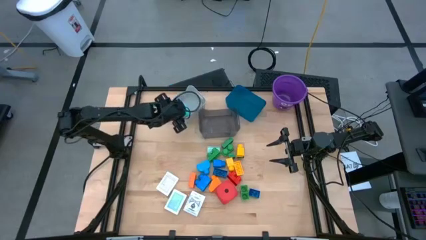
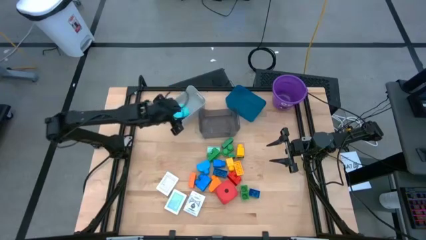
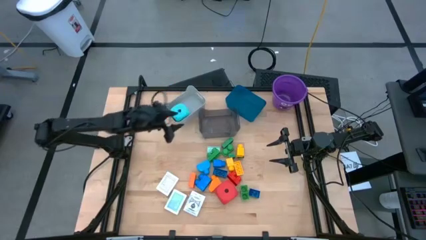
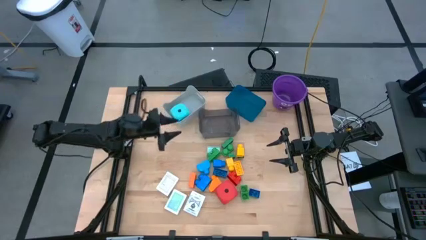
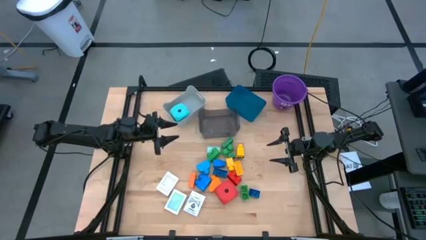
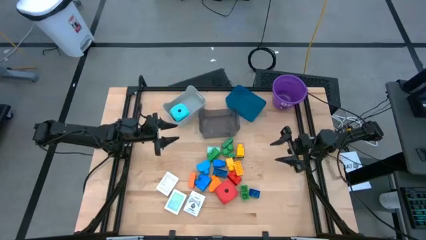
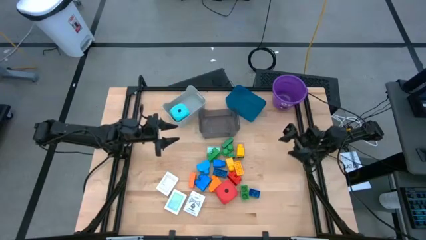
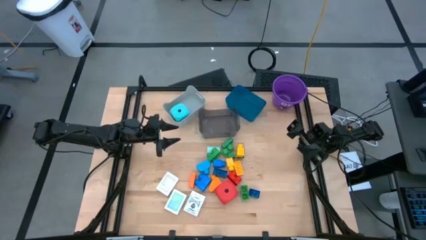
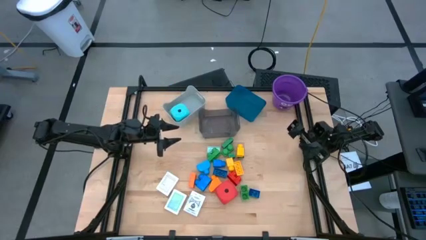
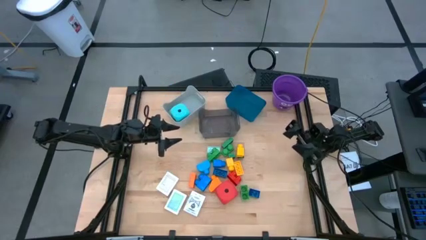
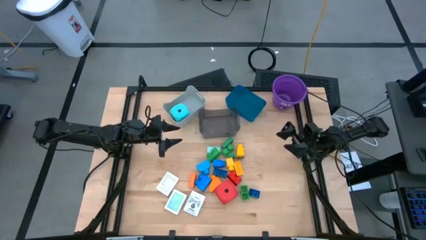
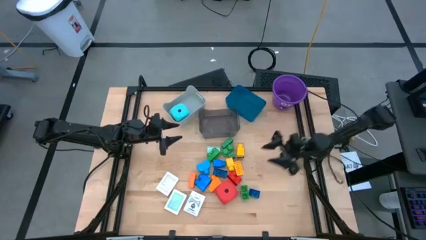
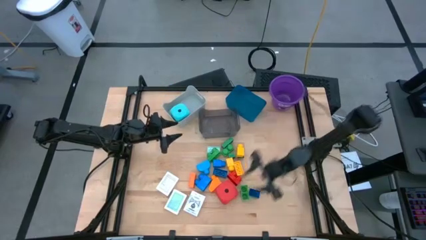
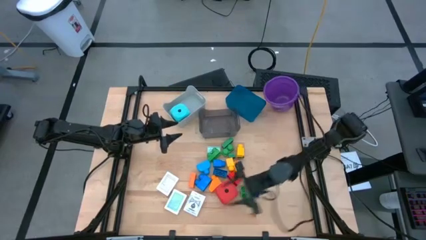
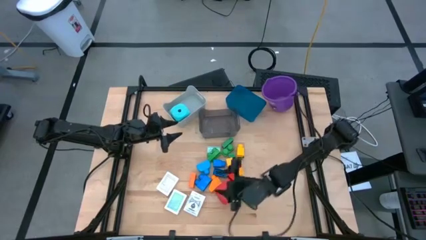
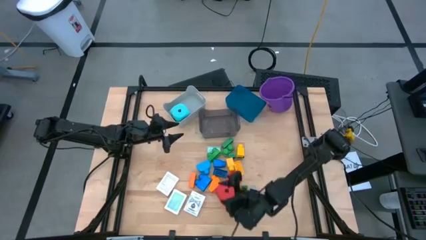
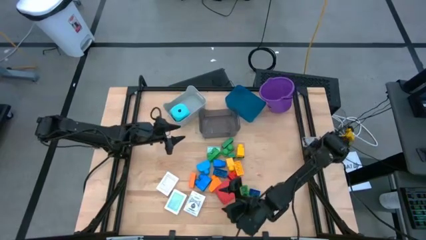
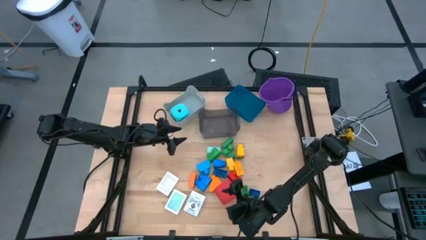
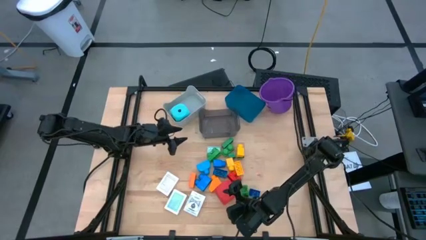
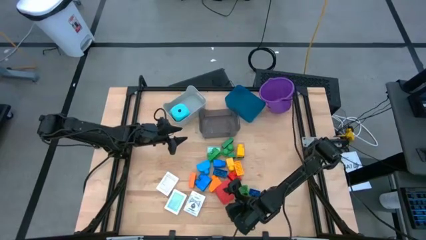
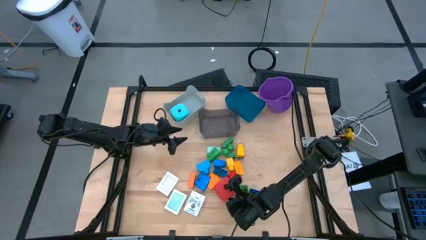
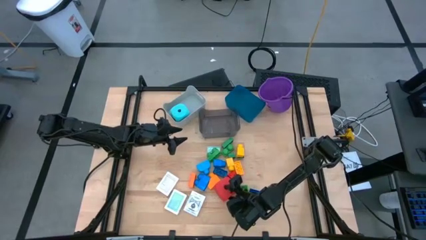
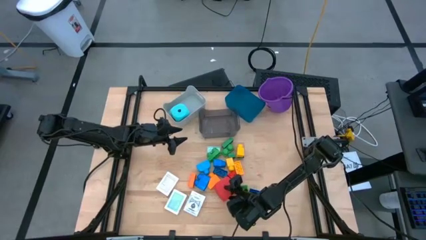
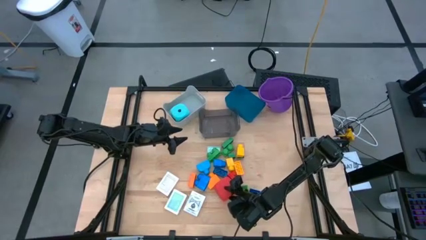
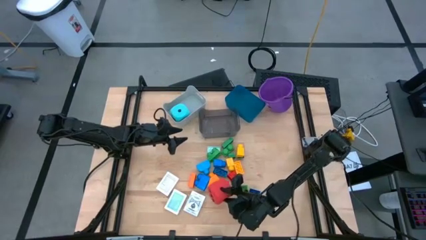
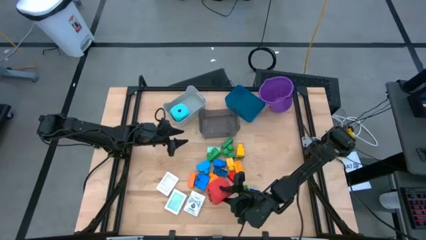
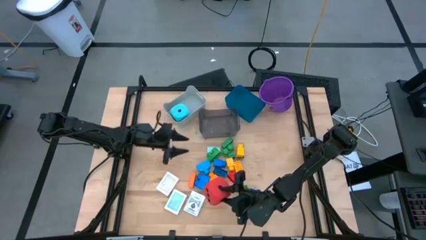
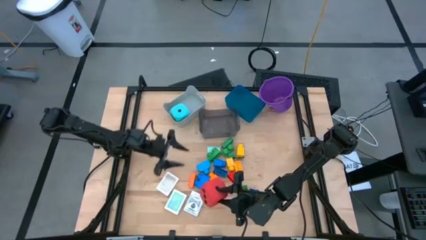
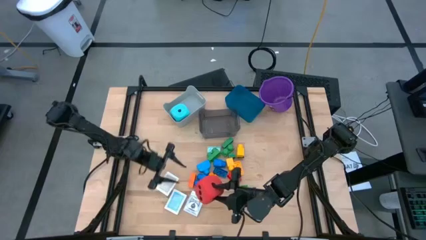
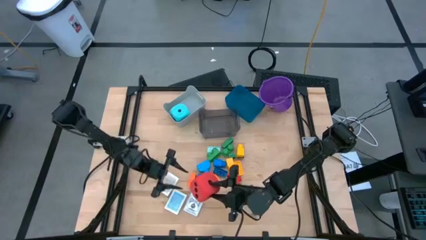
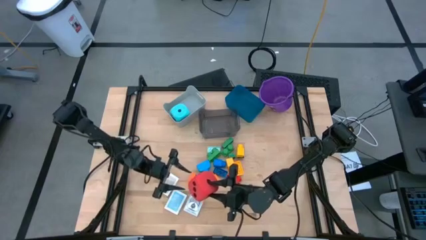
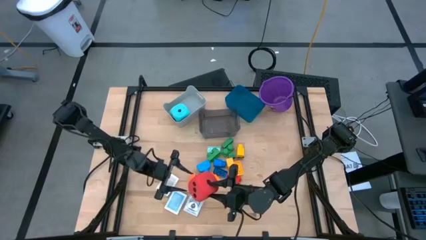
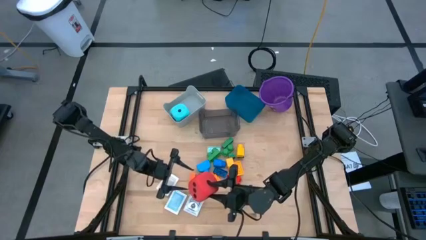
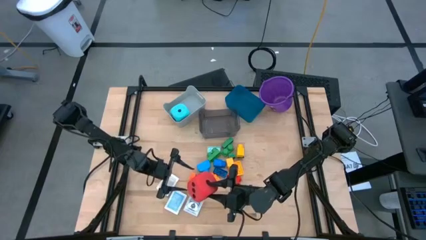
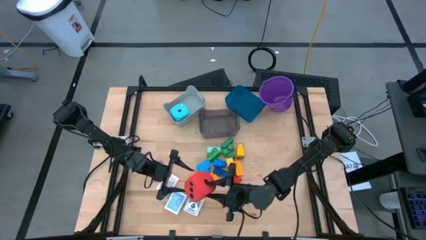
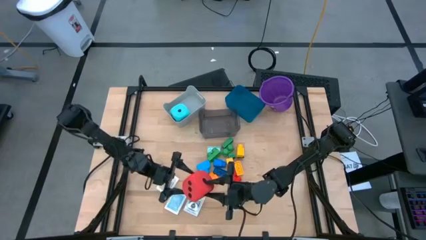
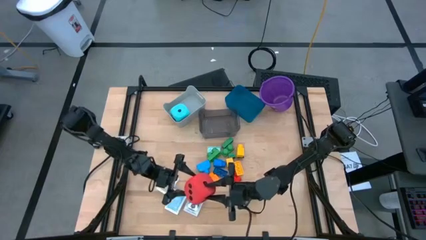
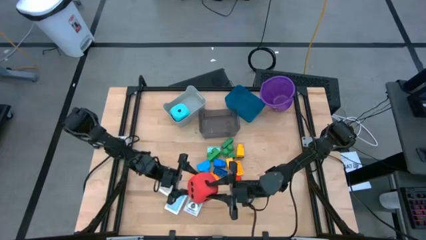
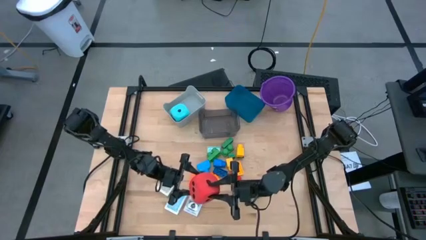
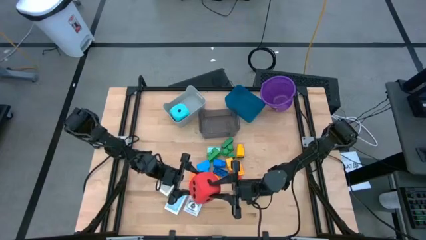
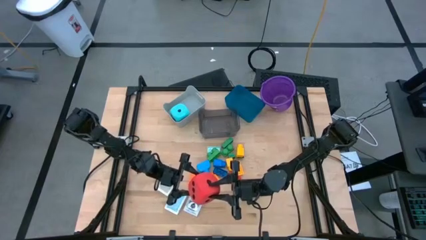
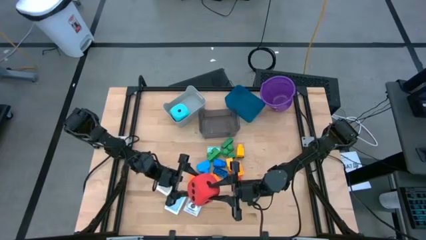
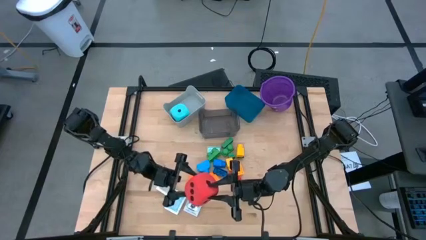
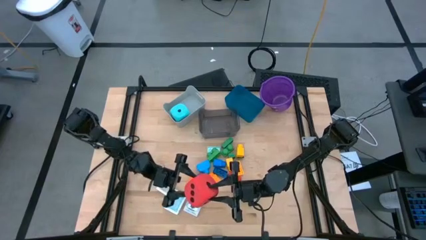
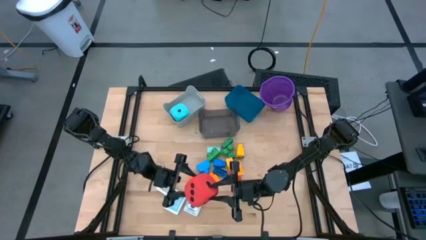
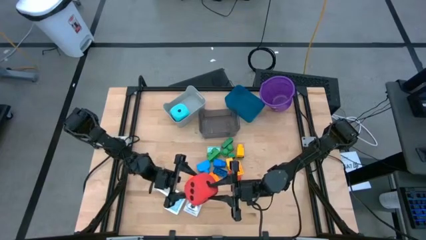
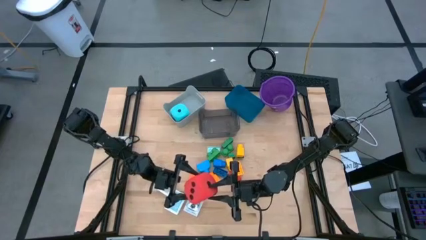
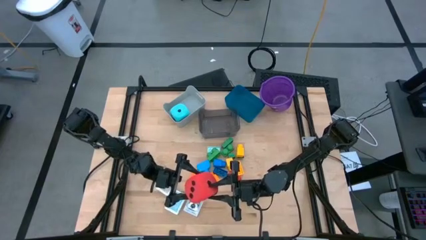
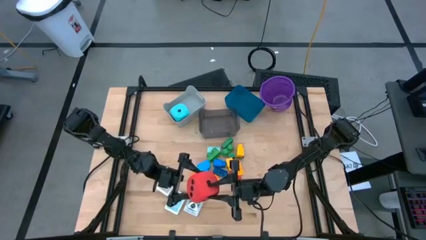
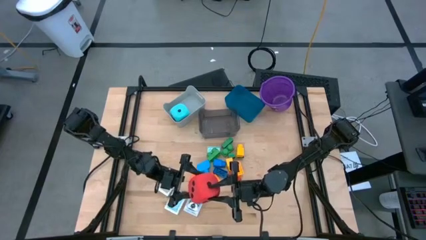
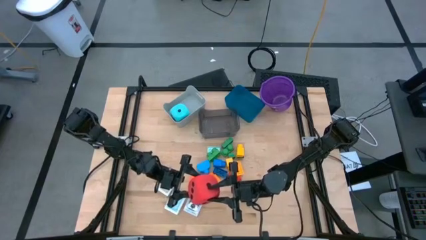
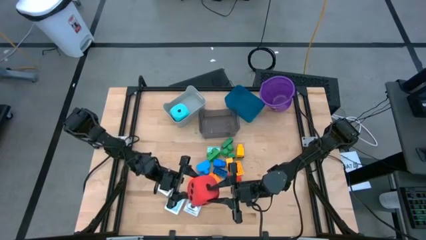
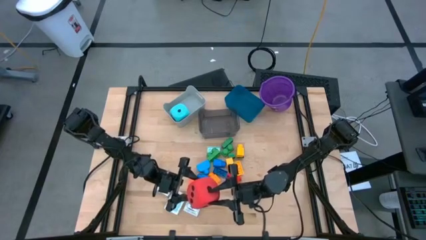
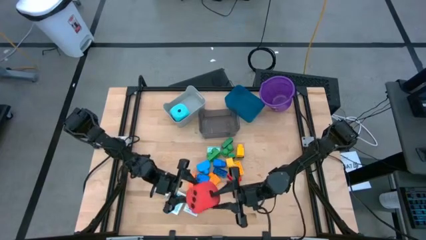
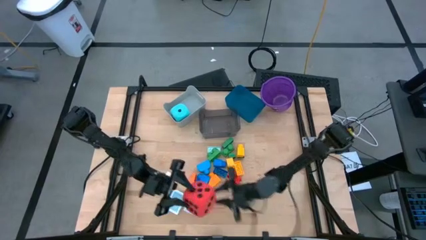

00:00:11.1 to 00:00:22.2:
Task: Pick & Place Toys
Put the red die into the gray bin

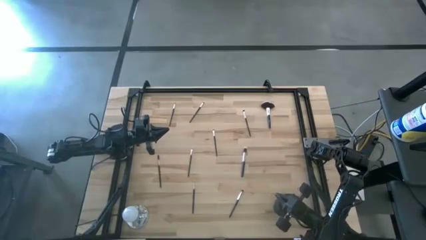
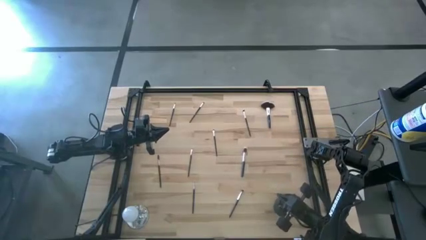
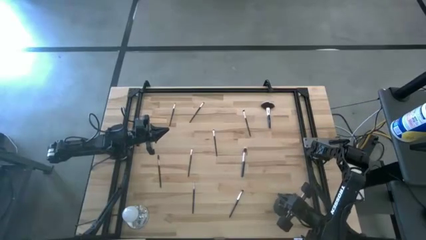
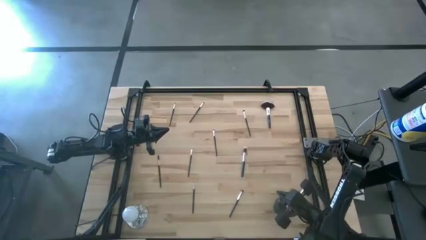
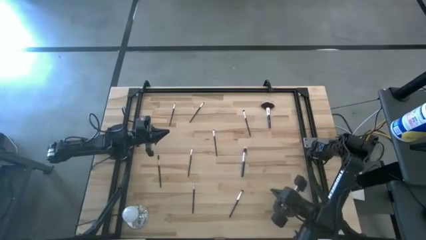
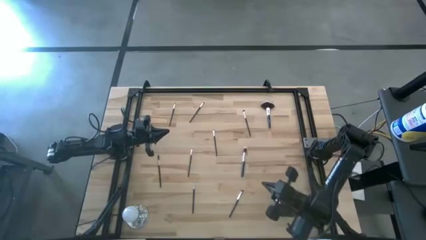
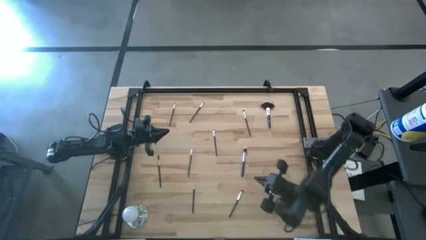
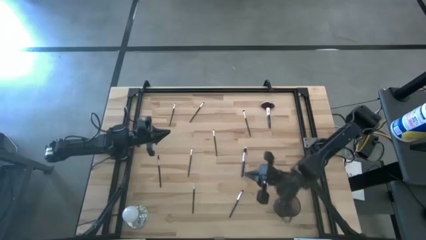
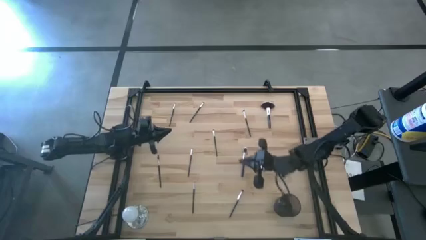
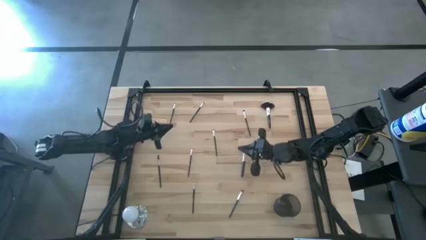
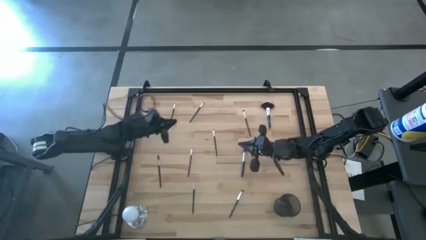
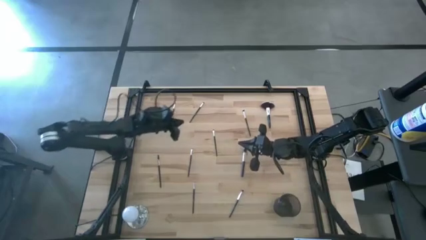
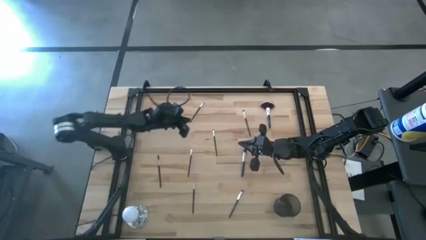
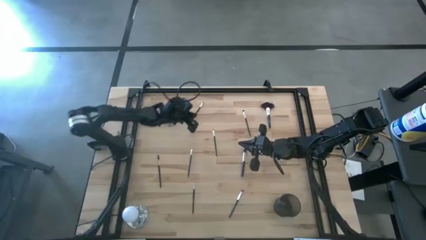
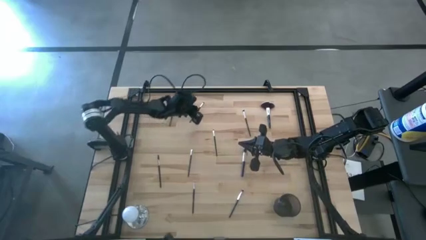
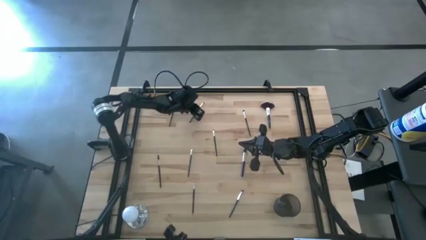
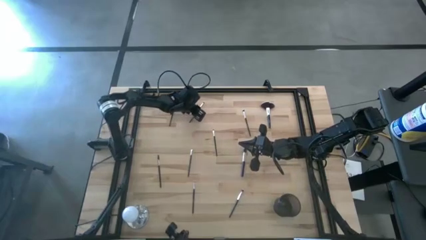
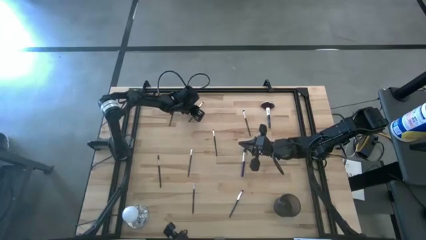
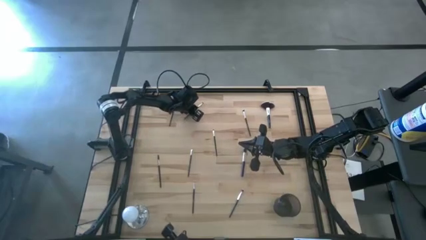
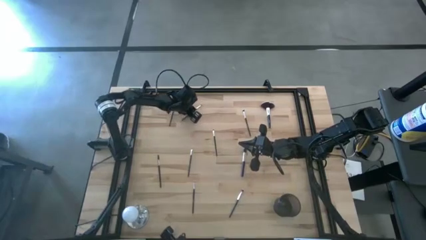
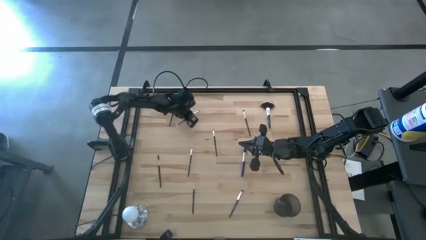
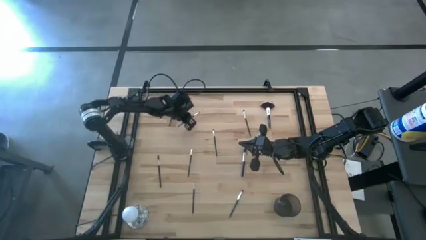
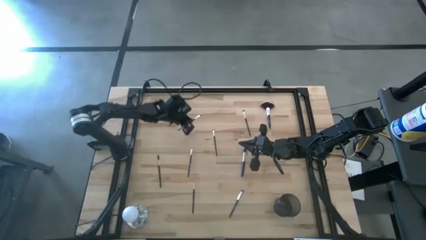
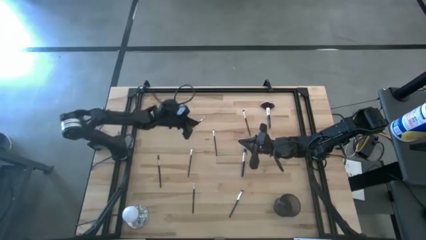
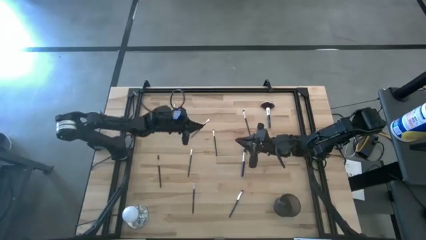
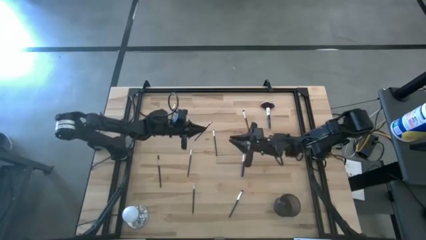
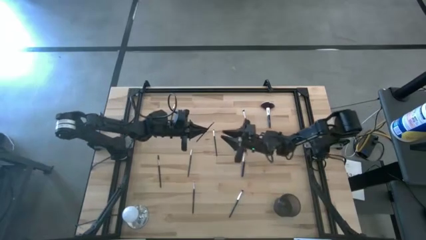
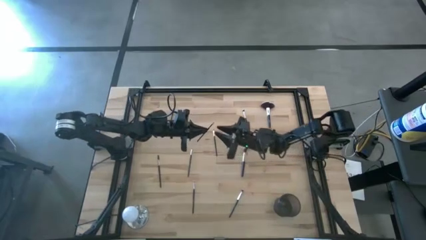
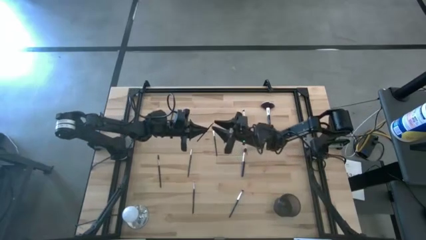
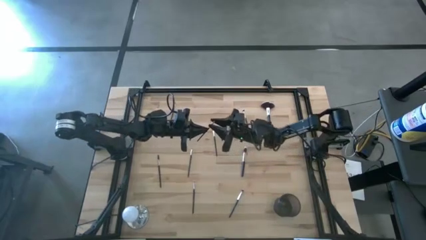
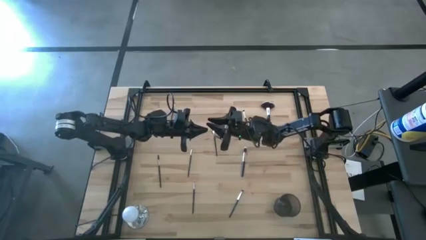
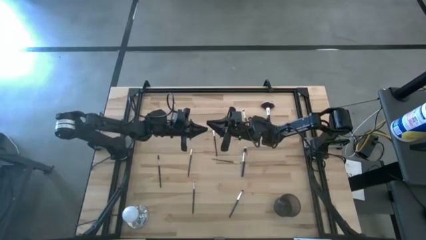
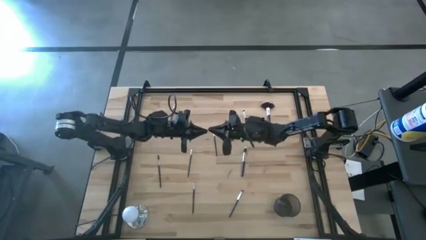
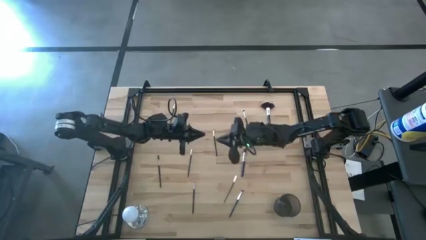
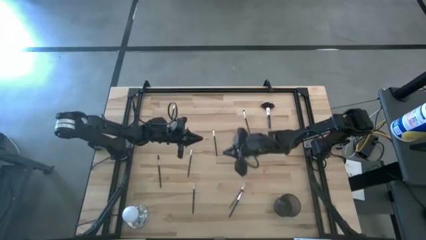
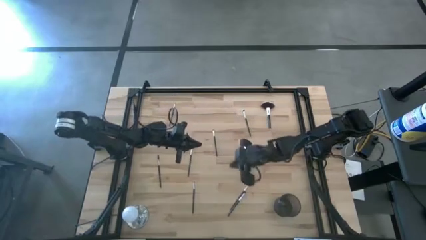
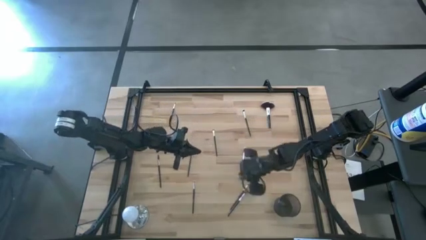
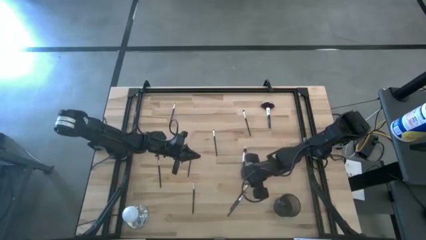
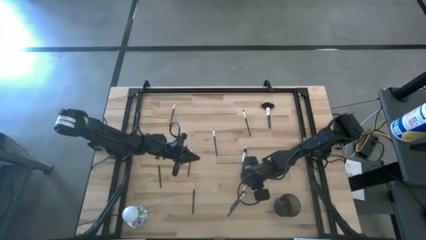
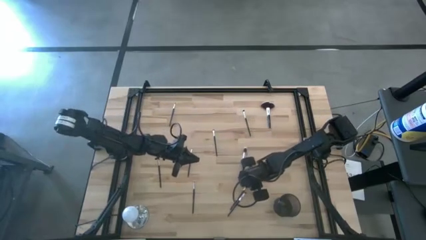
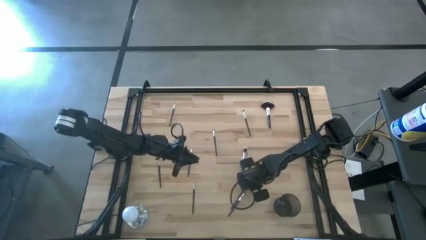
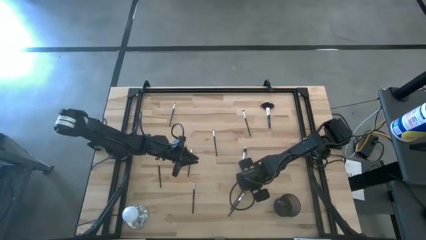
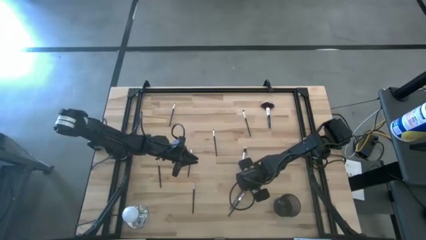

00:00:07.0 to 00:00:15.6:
Task: Sort items
Put the eyeshadow brush into the wire basket
